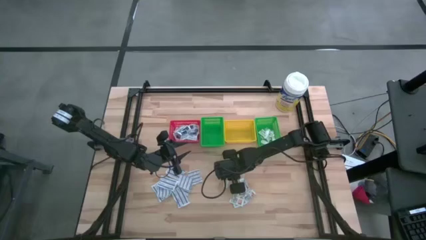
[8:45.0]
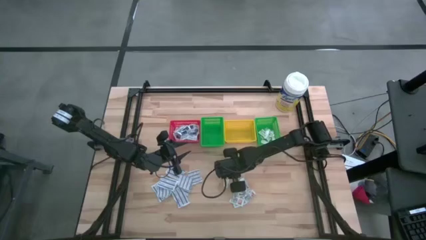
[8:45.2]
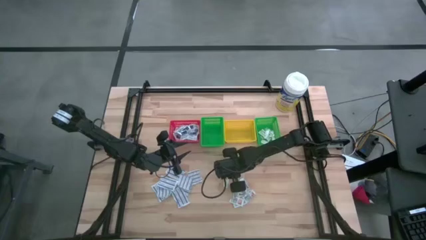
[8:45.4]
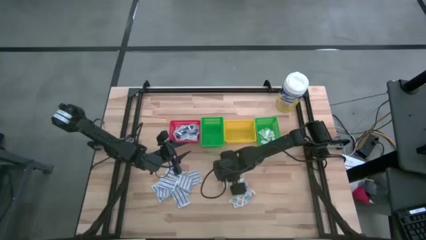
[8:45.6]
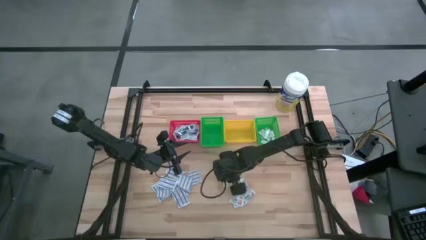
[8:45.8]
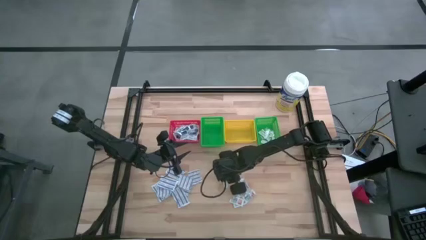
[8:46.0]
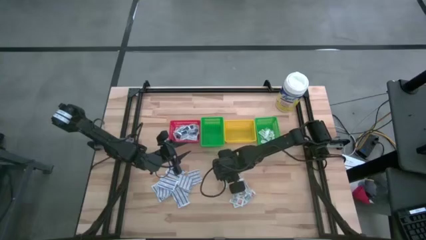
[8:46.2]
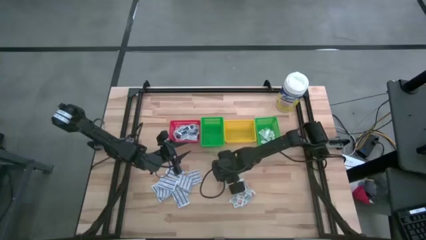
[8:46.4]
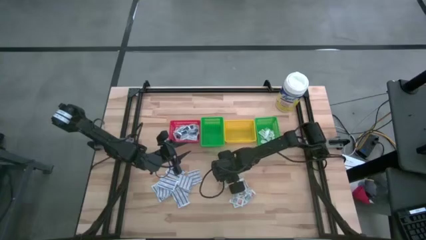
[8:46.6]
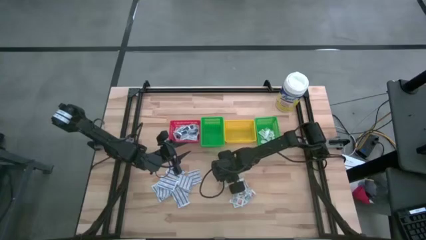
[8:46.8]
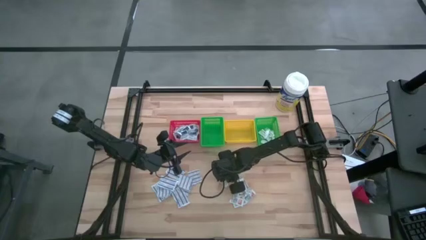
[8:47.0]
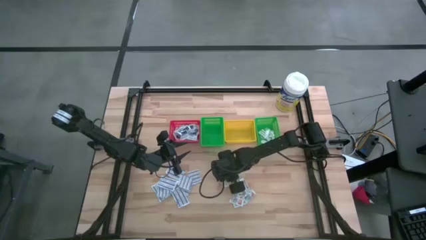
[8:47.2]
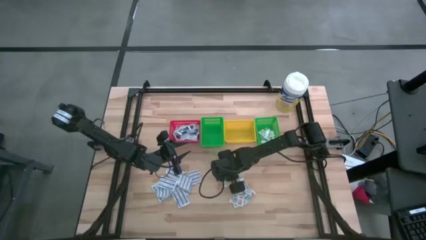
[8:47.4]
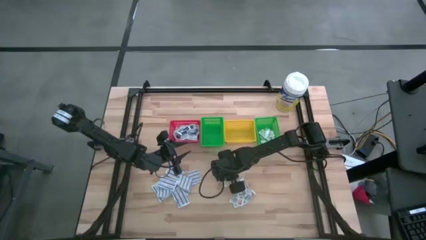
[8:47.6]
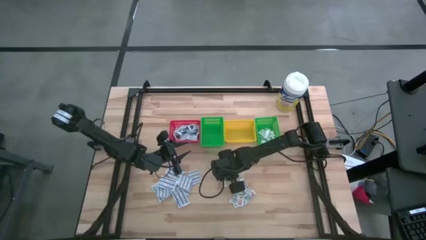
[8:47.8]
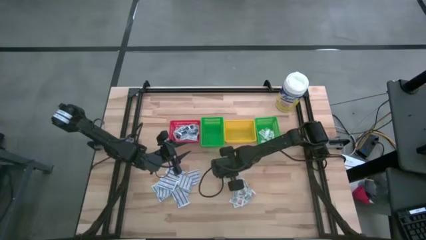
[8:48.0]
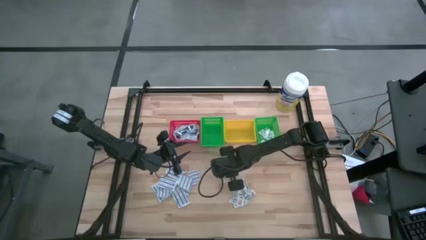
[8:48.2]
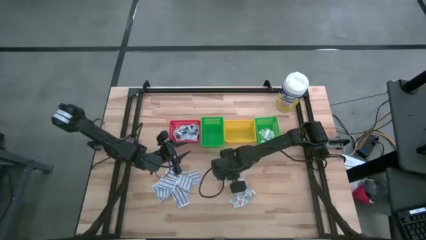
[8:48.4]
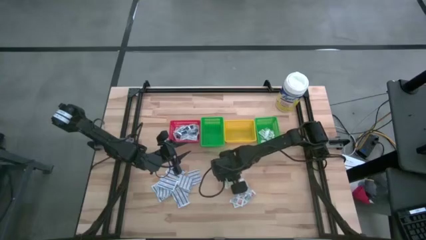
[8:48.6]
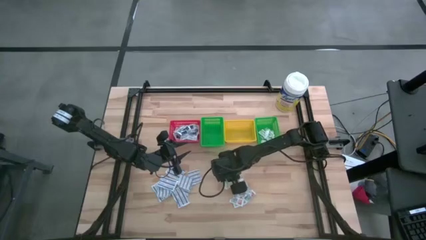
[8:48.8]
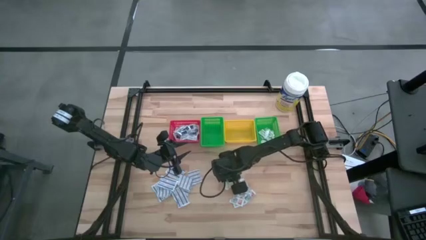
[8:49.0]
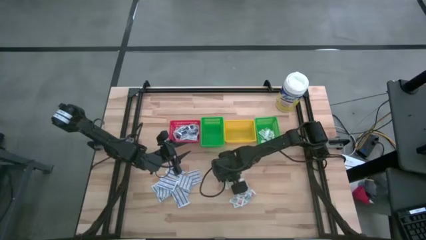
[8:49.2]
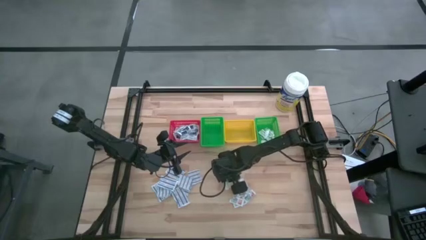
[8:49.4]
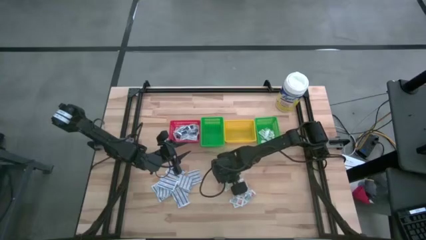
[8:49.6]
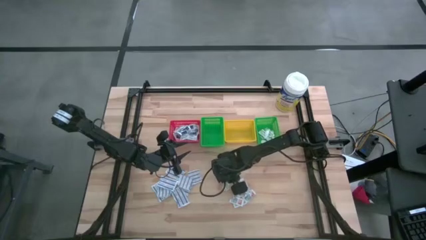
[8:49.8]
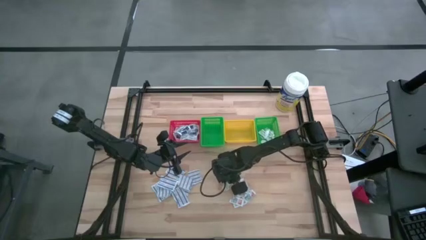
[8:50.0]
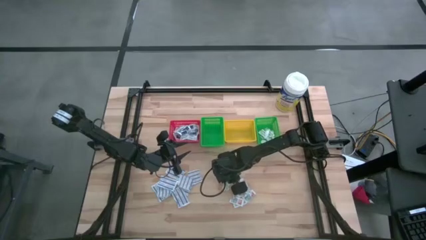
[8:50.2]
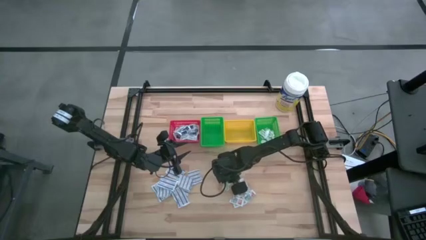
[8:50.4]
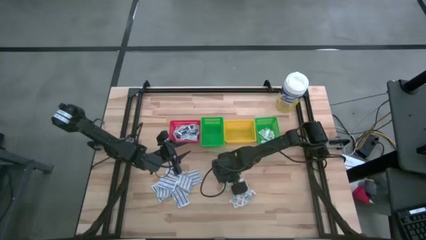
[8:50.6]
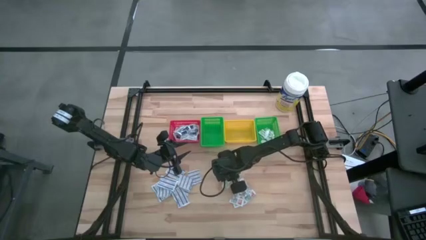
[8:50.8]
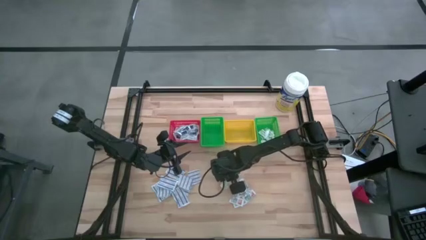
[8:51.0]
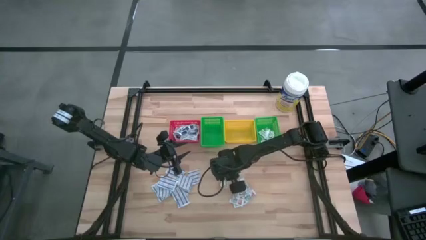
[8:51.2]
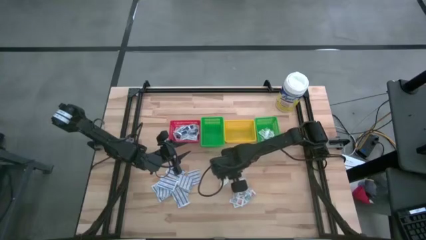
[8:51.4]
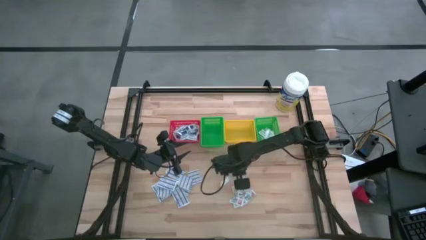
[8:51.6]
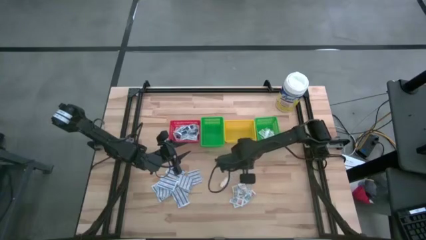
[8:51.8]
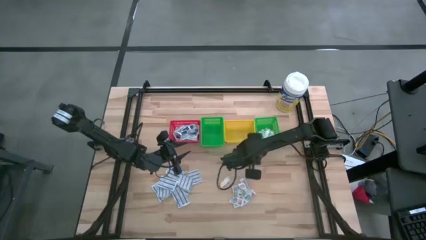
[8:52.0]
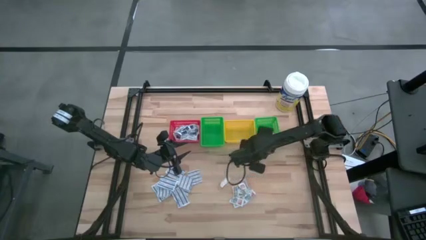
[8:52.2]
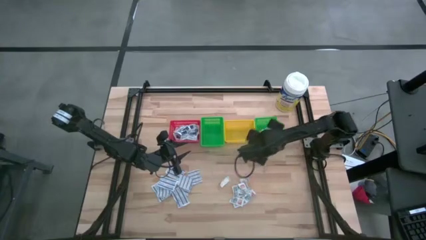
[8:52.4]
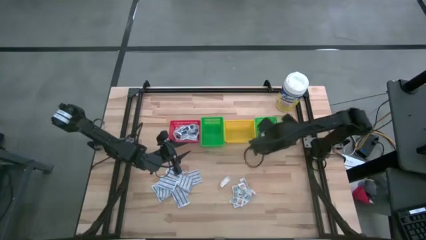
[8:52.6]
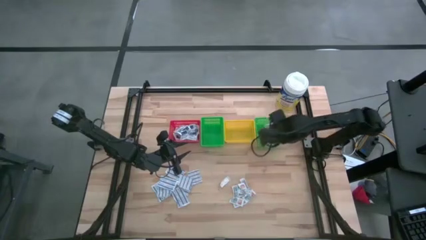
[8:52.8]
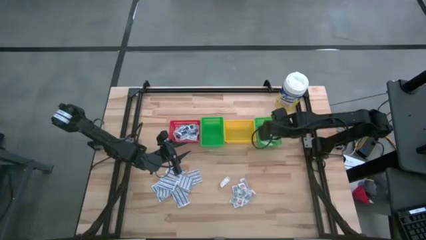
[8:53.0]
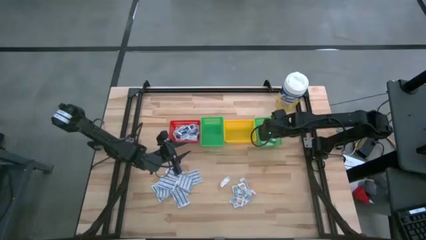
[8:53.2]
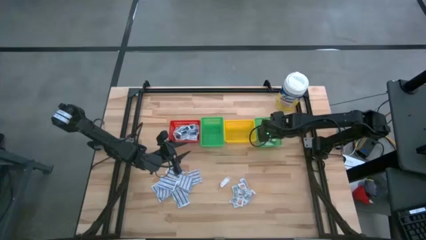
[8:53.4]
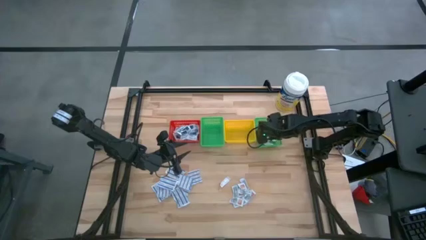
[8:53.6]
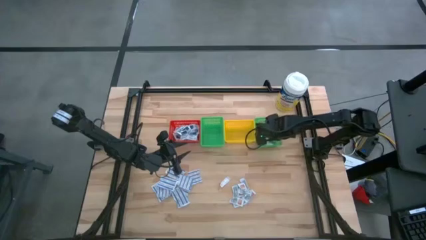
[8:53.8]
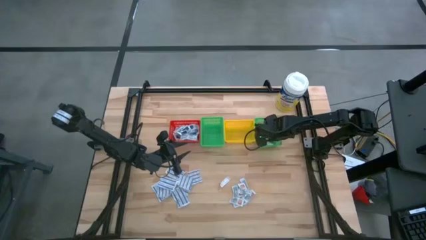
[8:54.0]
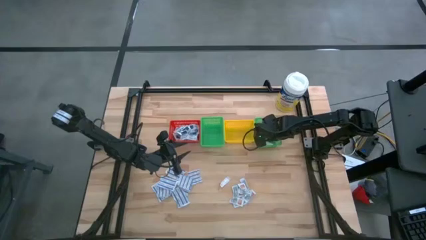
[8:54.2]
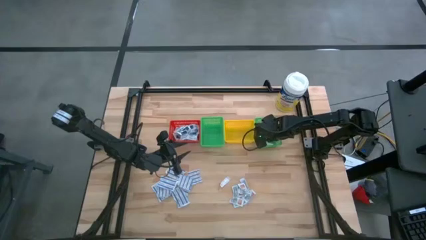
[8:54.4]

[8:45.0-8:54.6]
Task: Pick & Place First Aid Supplies
Put the green bandage into the right green basket

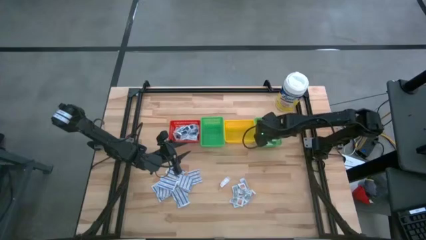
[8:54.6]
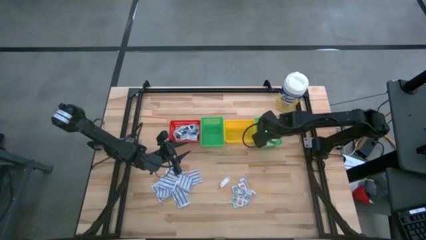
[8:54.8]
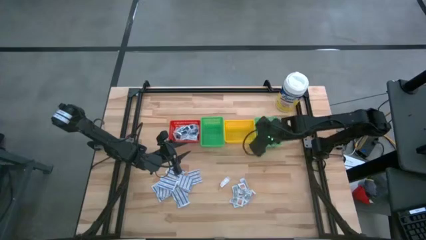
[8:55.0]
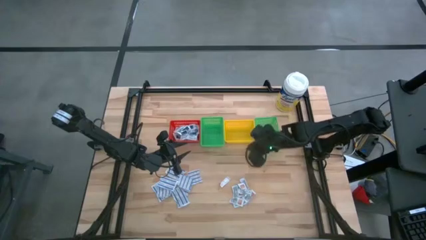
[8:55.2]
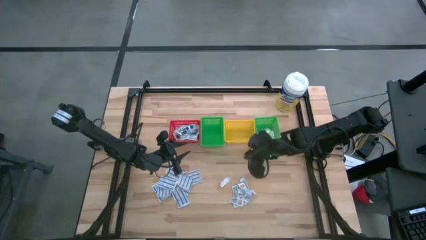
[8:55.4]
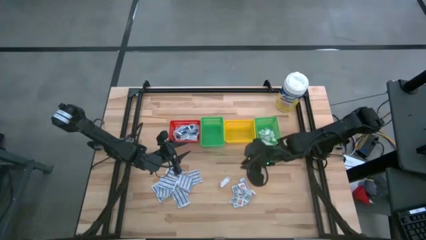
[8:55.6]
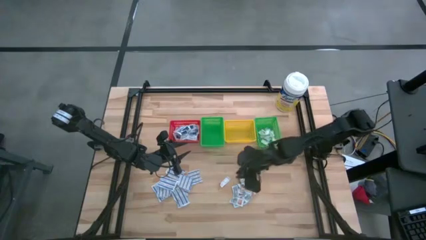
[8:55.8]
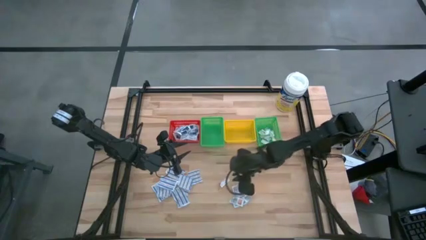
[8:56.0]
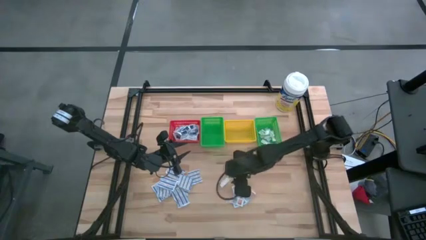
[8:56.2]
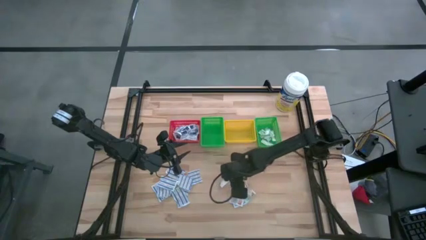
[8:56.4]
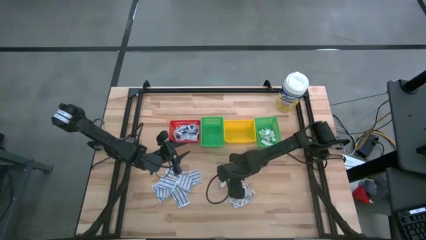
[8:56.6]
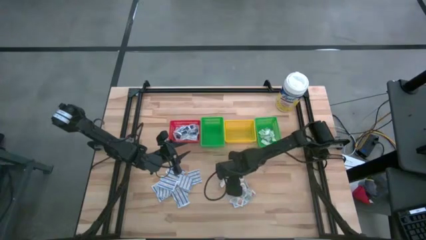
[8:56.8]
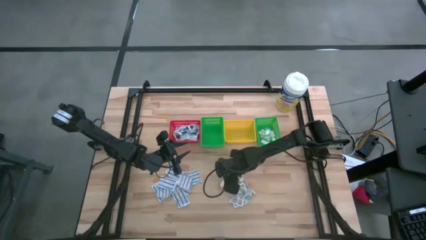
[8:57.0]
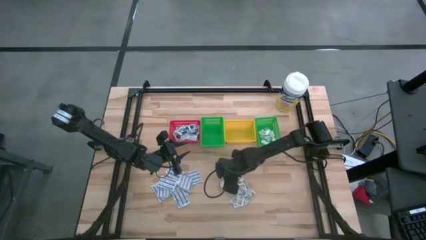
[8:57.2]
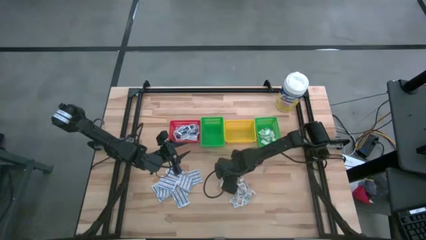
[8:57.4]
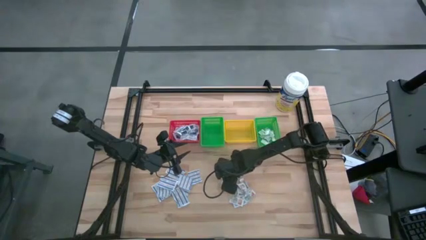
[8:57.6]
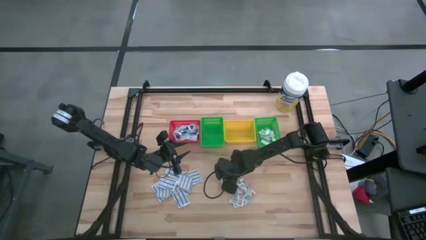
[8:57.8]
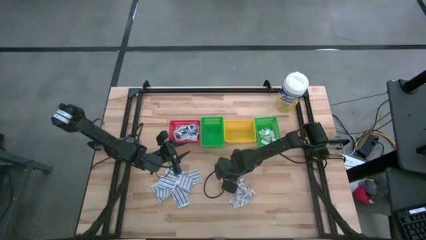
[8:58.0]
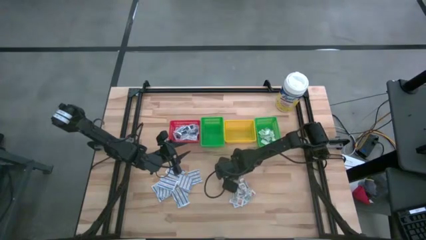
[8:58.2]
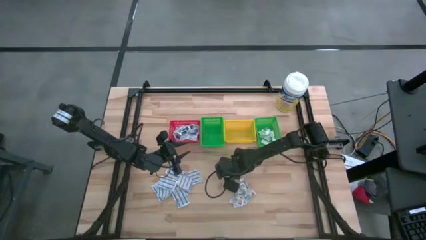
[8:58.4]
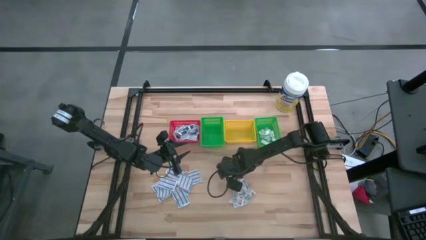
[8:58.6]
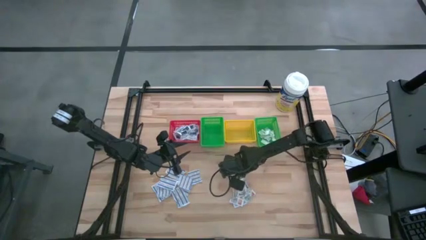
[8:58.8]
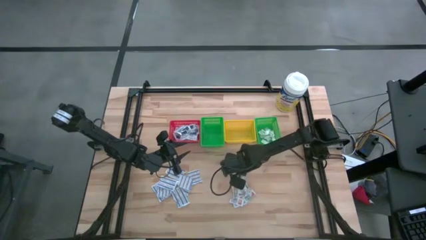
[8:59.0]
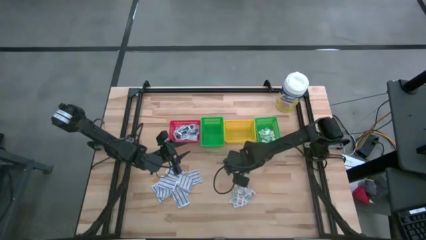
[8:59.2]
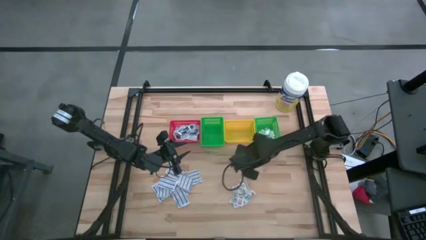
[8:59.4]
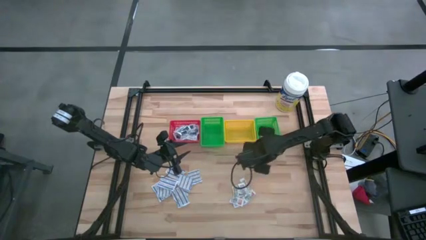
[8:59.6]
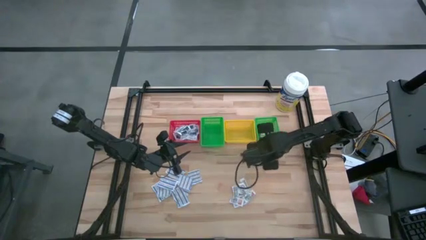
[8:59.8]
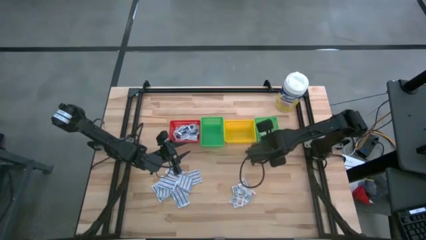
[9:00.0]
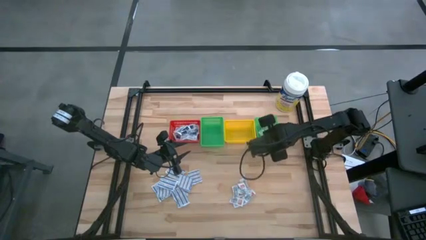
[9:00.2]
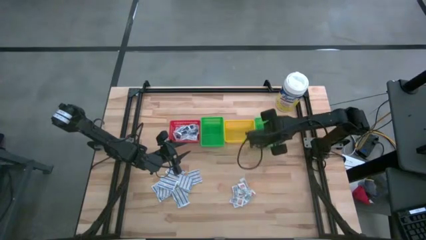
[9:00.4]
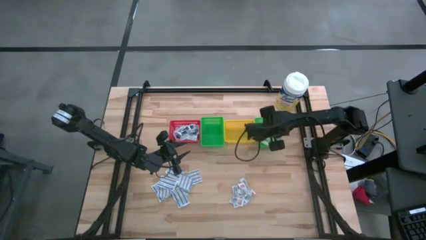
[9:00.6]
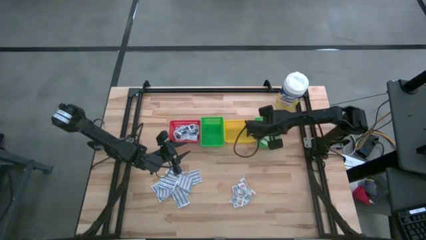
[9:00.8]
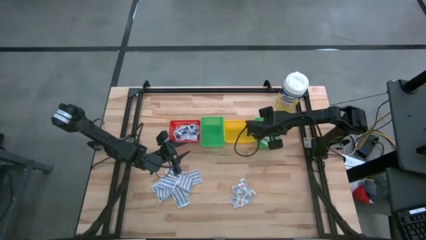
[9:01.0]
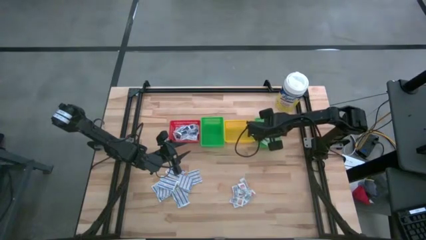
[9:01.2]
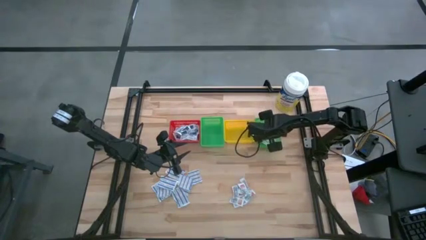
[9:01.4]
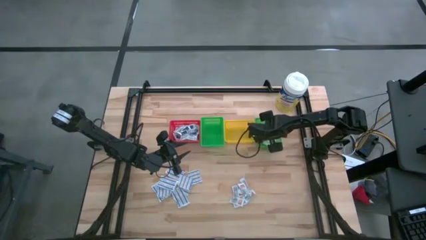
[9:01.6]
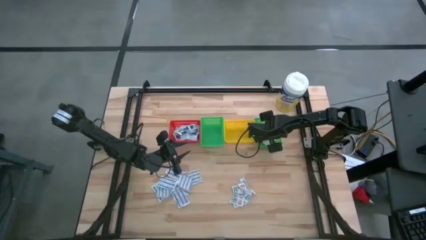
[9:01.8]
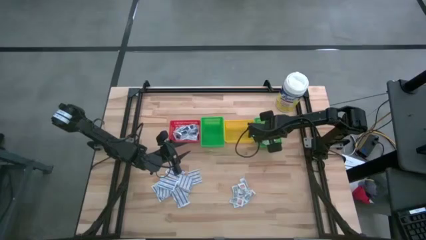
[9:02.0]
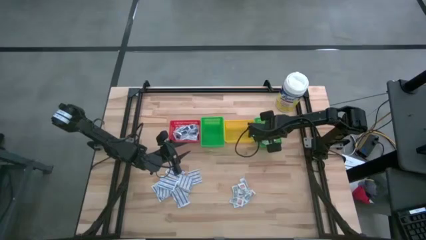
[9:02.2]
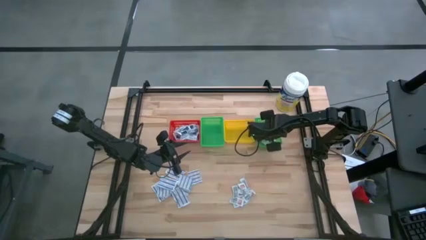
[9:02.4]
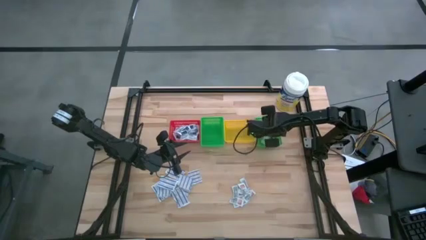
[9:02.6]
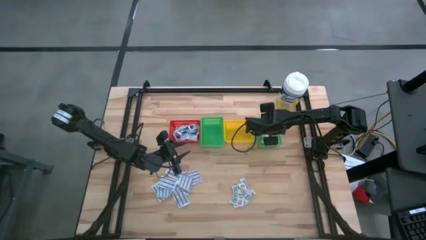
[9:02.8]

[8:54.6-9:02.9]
Put the green bandage into the right green basket
